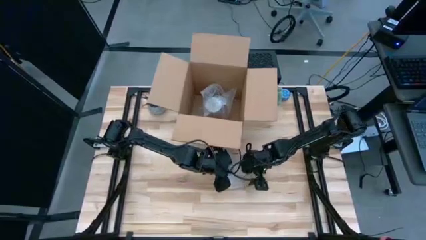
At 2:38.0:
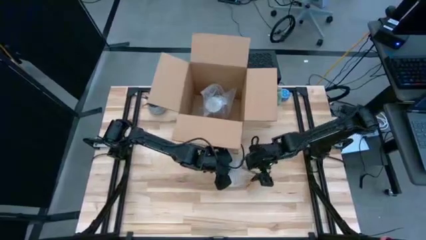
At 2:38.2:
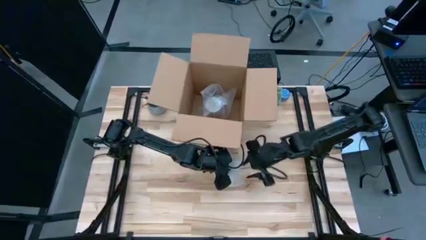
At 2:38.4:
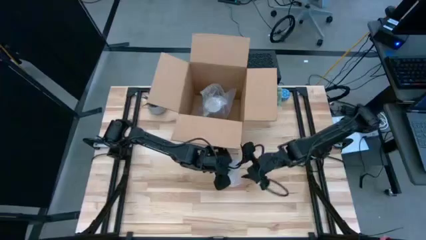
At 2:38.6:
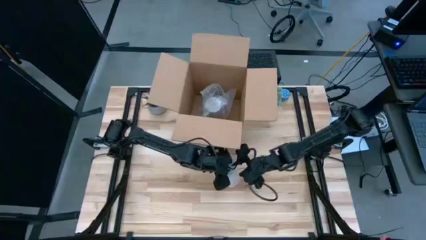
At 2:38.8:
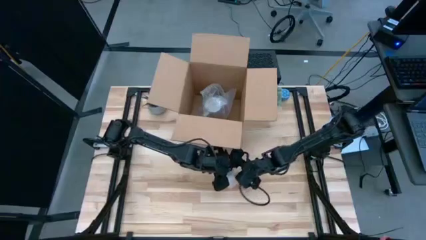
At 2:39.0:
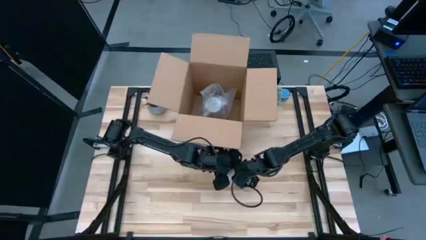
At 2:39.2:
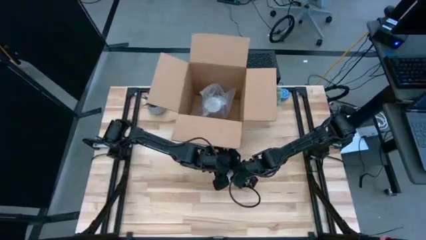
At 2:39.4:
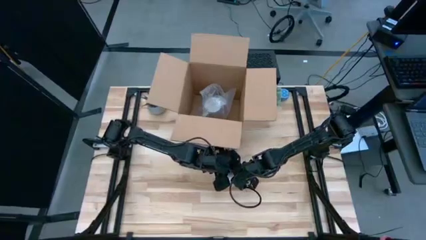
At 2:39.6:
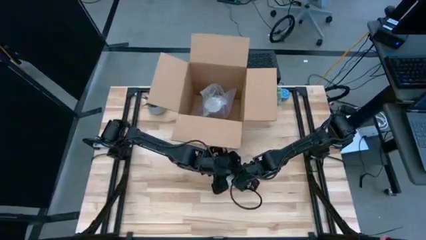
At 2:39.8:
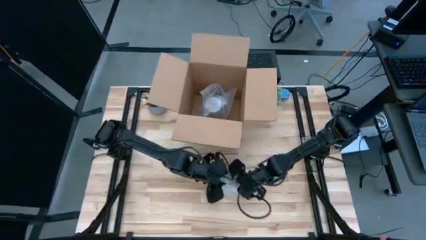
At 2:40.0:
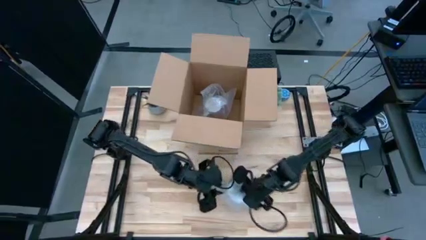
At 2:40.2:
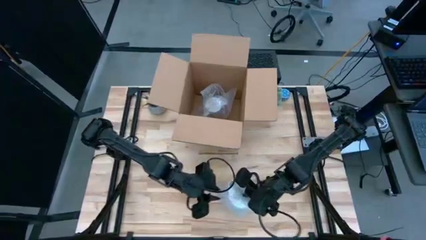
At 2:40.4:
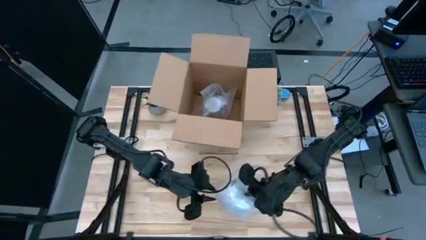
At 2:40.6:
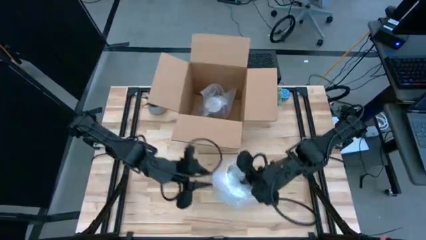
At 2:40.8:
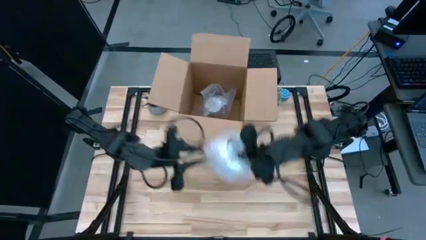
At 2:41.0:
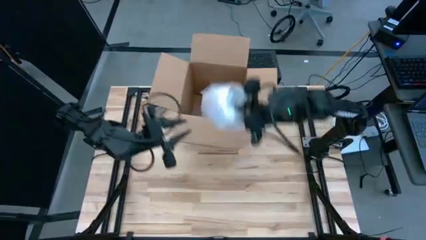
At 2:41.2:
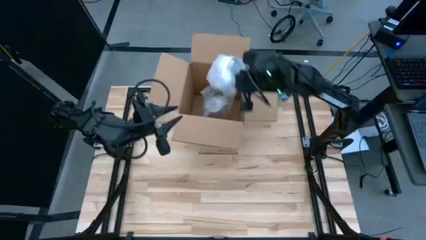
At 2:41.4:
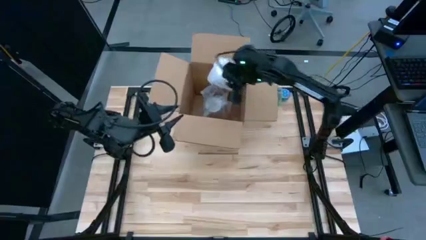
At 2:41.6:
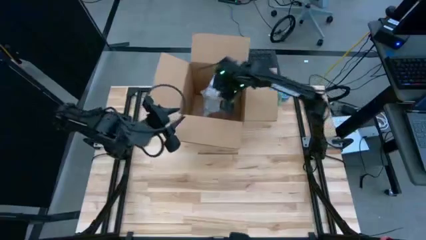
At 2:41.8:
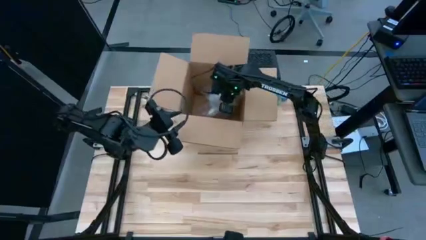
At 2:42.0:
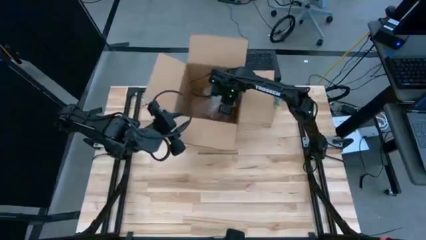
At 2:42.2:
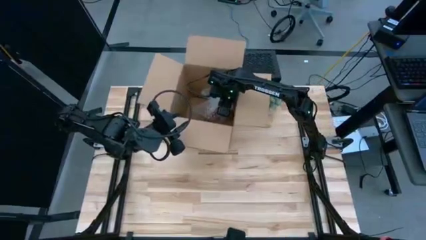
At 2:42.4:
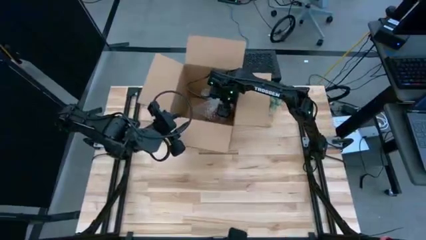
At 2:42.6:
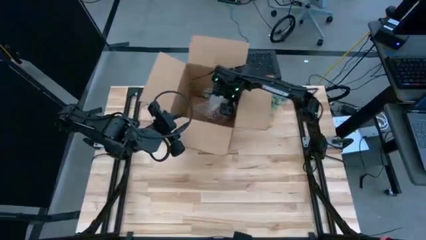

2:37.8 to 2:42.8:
Task: wrap mug
Put the wrapped orange mug into the brown box

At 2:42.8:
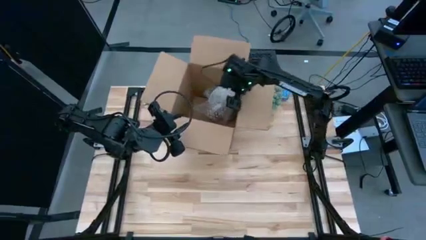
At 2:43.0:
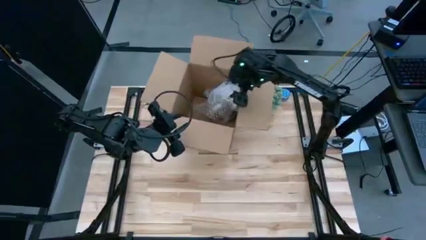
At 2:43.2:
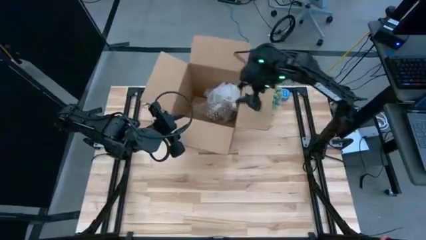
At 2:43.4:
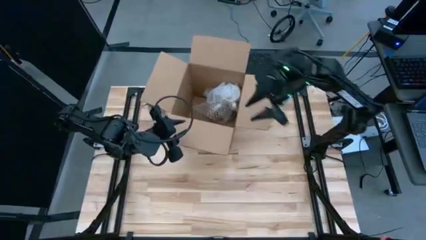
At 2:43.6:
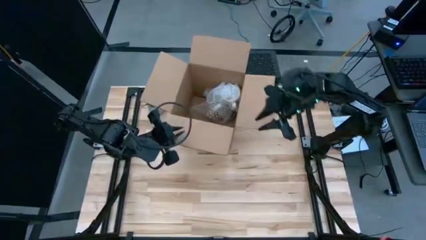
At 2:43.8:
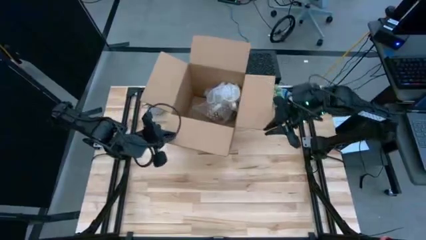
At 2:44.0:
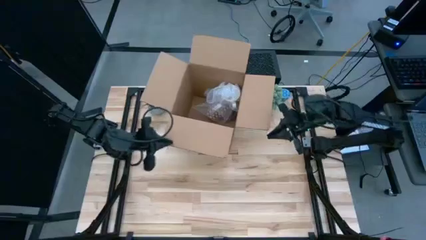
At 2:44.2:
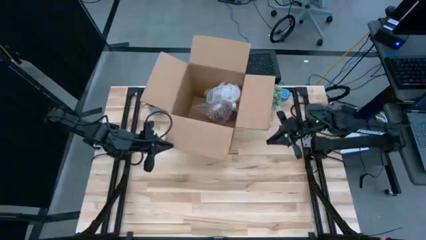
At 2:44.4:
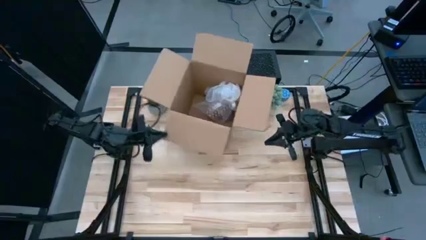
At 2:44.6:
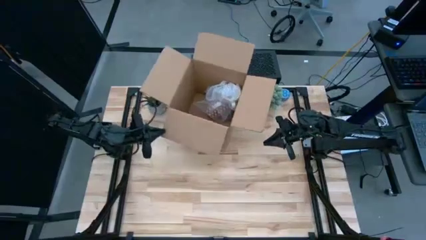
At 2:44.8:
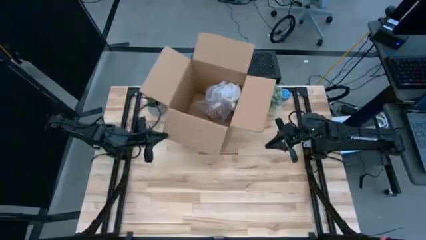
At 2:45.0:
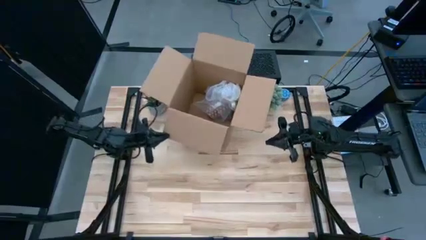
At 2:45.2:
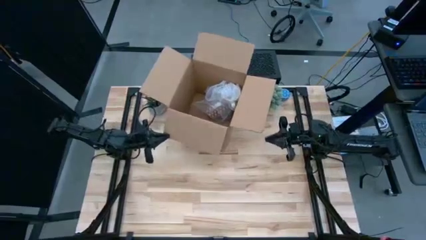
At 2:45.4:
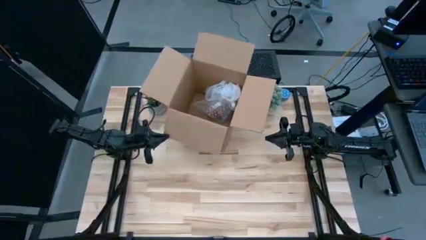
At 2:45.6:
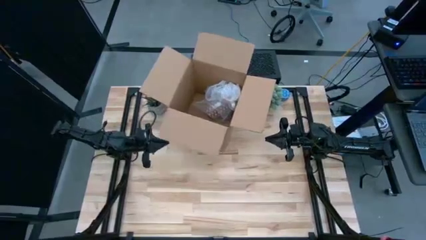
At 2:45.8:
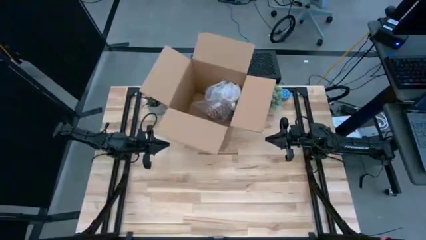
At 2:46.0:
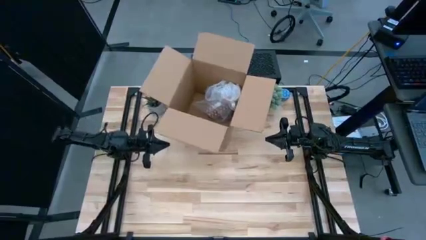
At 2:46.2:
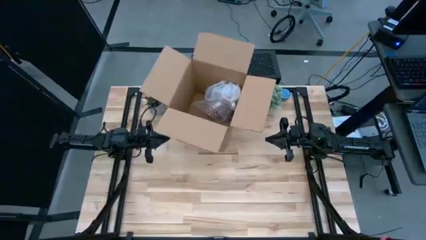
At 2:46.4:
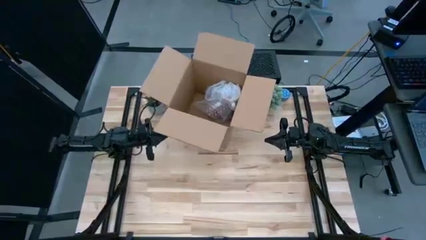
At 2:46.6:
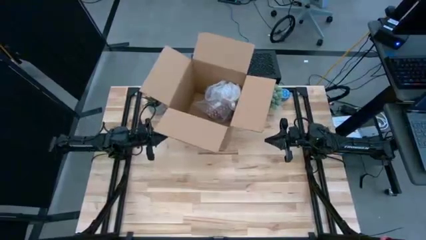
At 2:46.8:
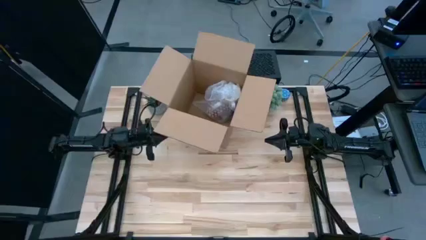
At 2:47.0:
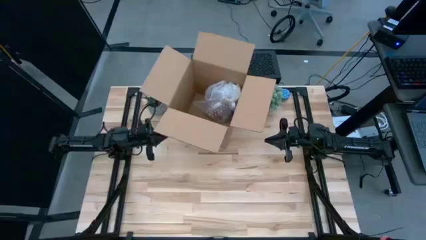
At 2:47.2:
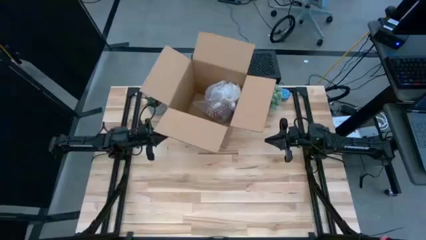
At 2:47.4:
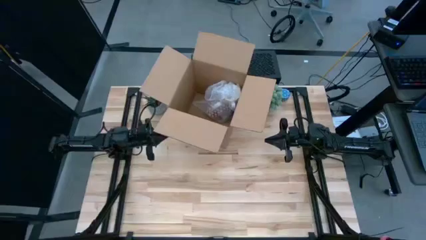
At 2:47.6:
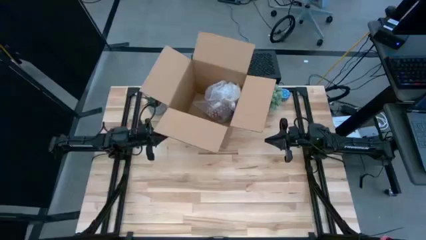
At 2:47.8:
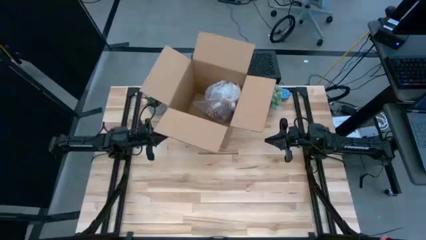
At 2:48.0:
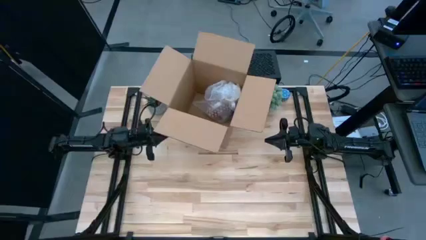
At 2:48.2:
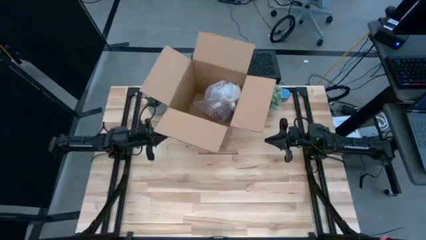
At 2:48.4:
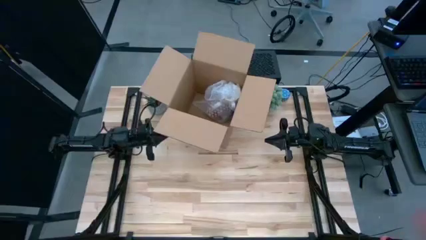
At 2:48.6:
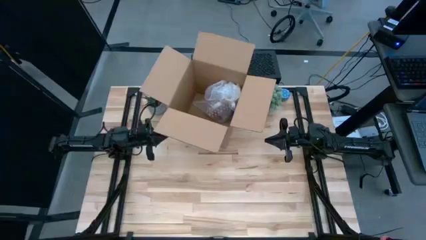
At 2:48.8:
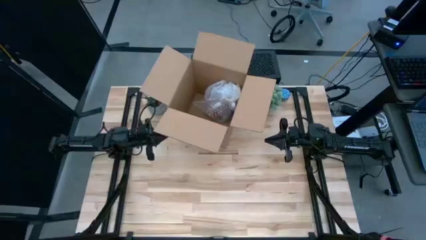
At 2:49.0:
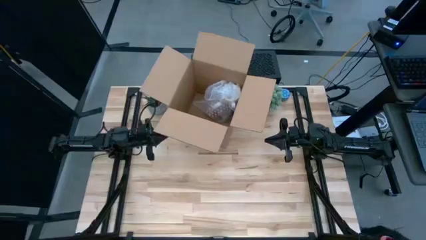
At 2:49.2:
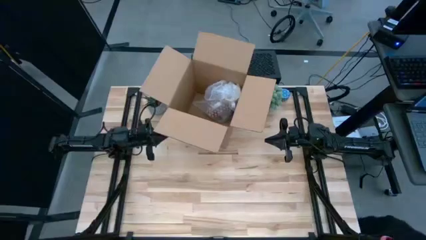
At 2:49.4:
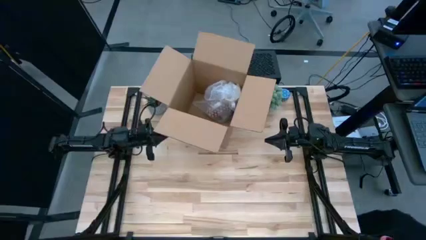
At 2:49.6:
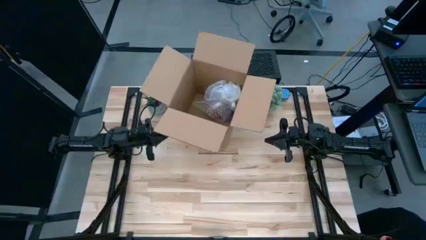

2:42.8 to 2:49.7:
Return to Home Position
